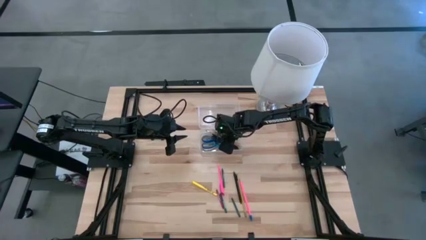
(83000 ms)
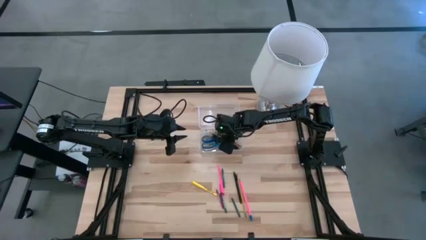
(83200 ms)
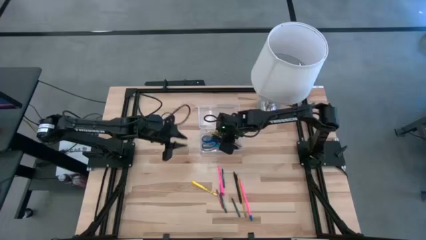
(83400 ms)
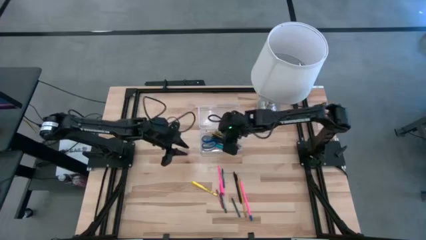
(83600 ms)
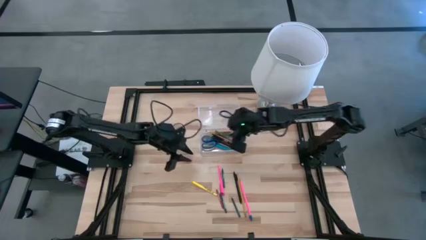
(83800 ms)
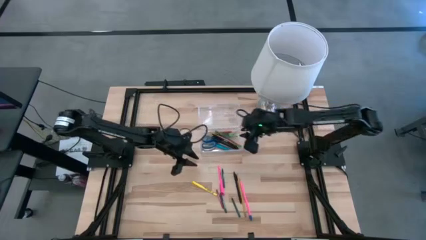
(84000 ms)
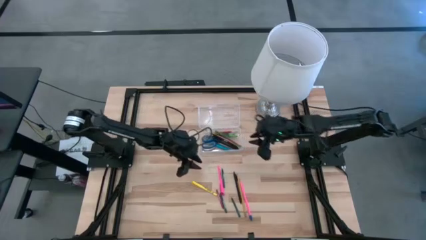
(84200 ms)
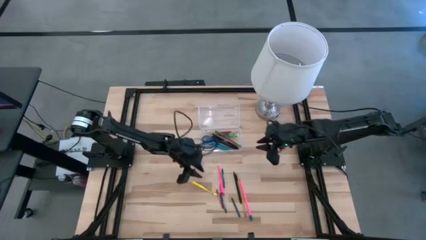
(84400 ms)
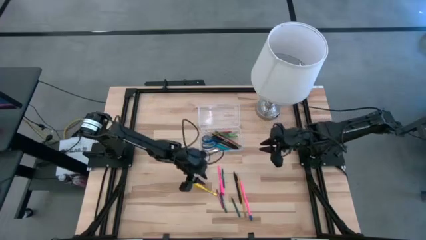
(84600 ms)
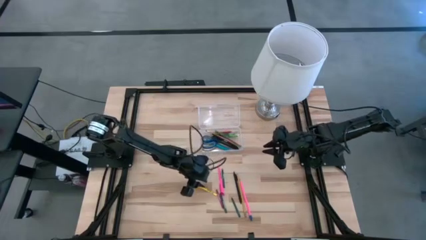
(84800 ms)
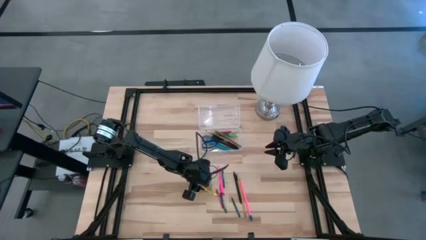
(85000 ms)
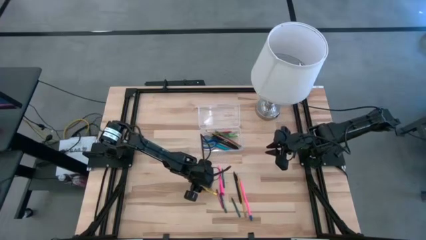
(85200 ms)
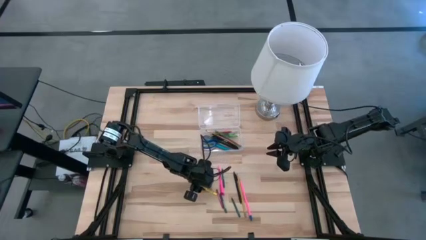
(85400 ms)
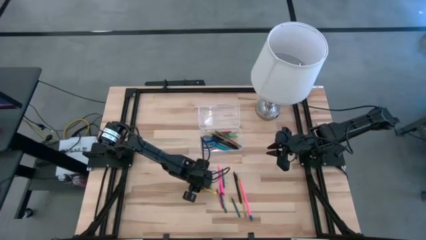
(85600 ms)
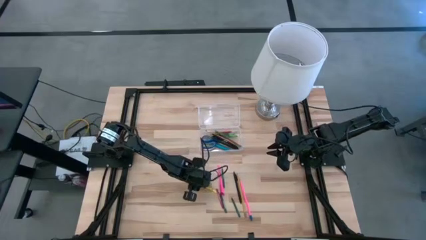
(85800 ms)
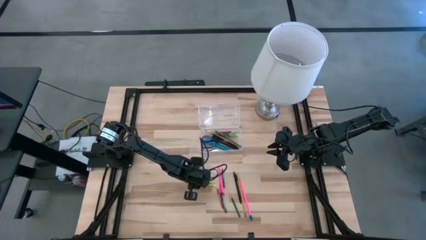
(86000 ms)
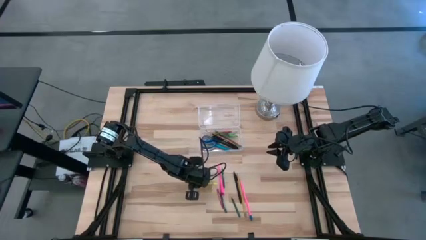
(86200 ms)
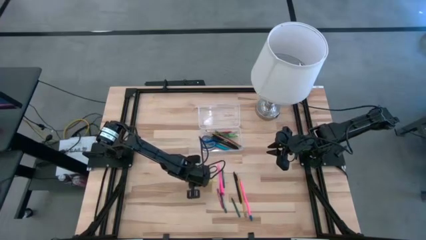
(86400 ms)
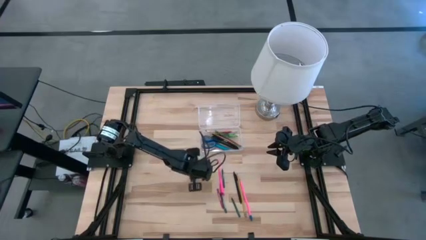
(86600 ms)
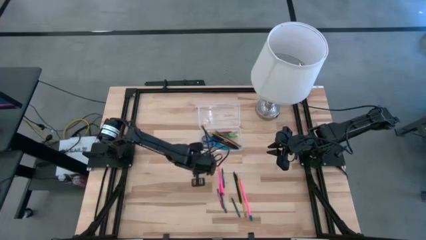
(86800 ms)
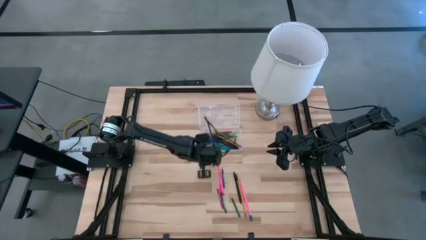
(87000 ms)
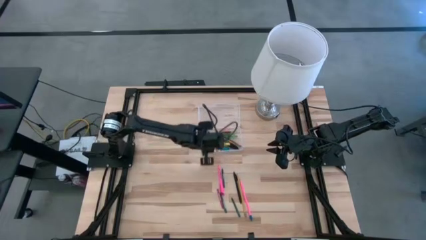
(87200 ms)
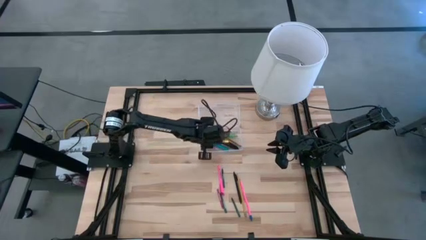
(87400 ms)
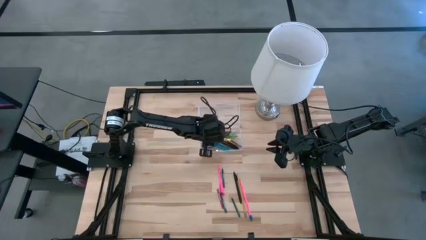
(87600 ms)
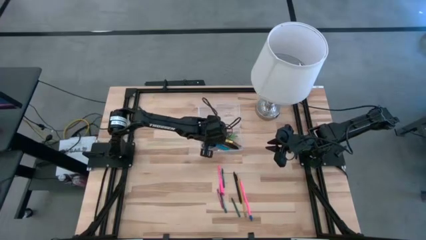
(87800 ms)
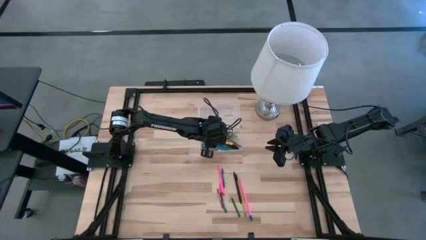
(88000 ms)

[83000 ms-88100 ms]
Task: Pick & place school supplies into a supply box
Put the yellow pen into the transparent supply box

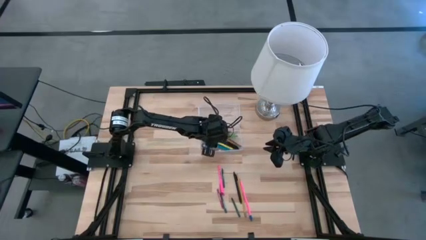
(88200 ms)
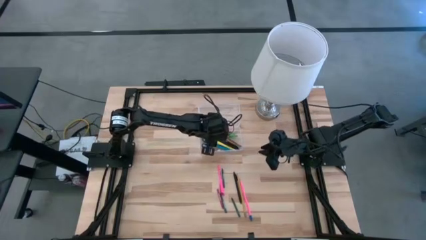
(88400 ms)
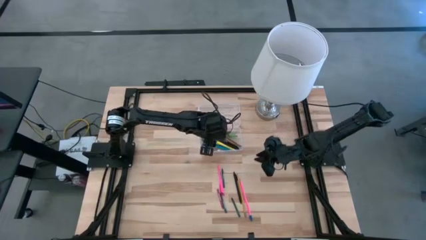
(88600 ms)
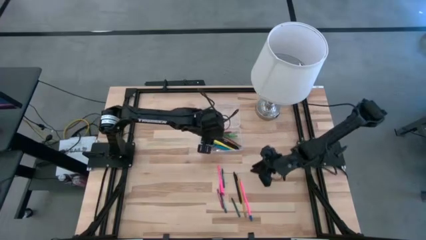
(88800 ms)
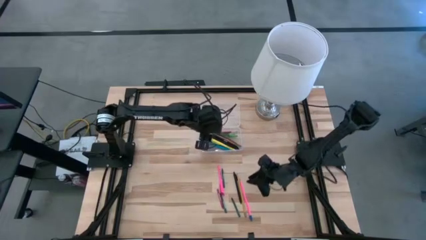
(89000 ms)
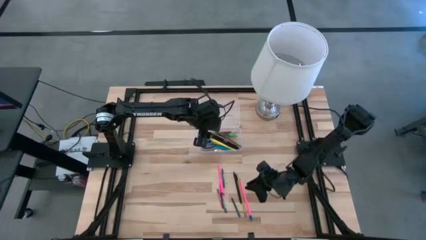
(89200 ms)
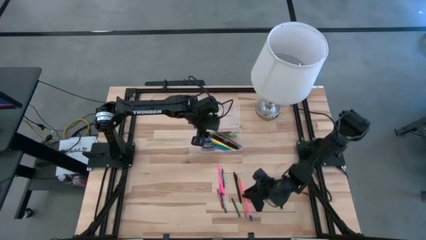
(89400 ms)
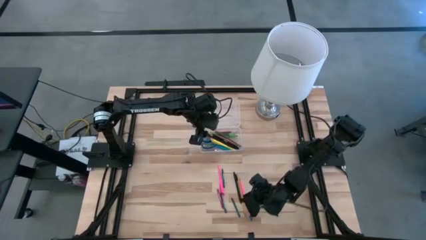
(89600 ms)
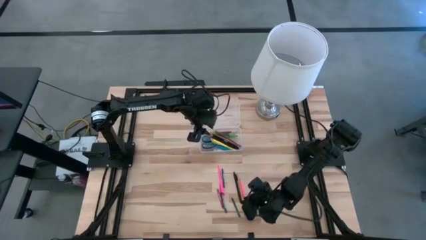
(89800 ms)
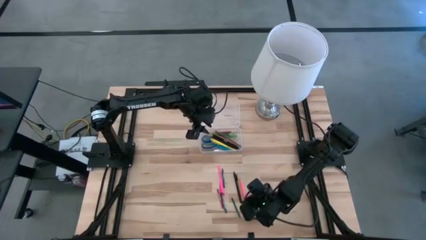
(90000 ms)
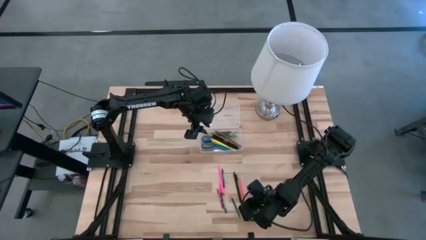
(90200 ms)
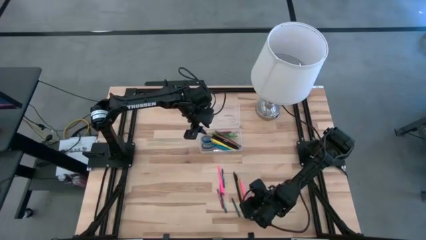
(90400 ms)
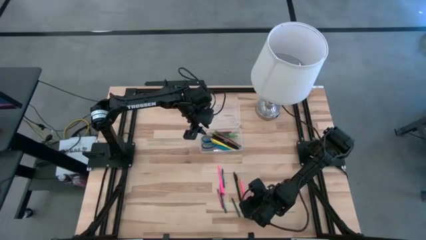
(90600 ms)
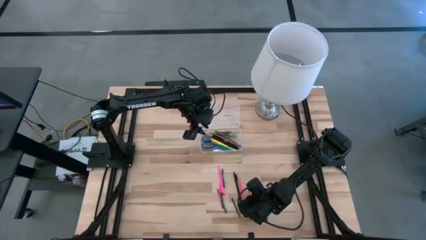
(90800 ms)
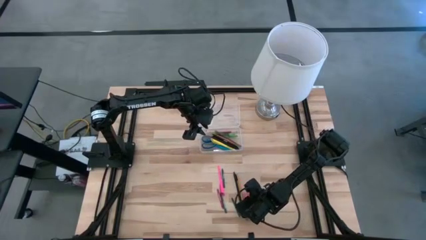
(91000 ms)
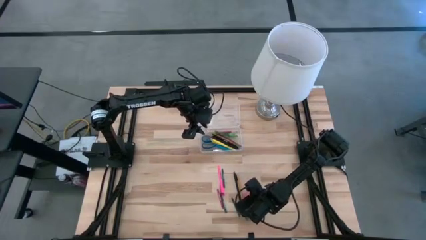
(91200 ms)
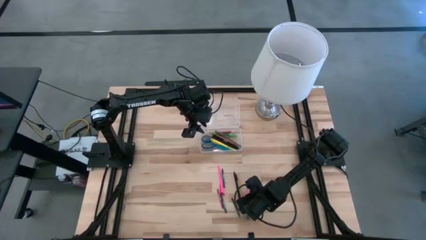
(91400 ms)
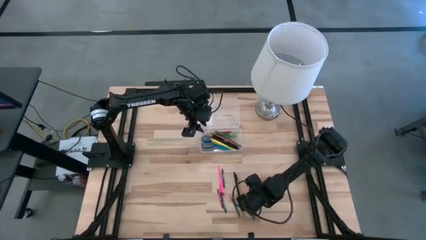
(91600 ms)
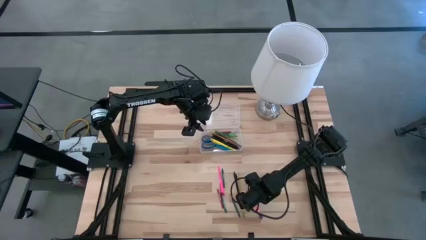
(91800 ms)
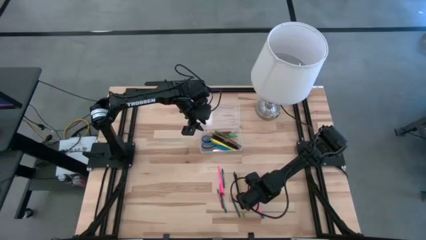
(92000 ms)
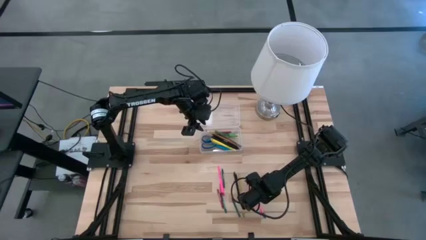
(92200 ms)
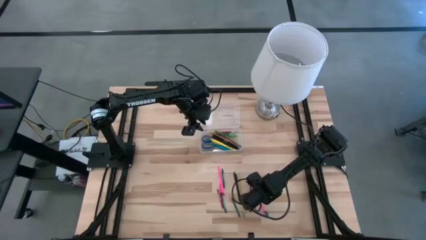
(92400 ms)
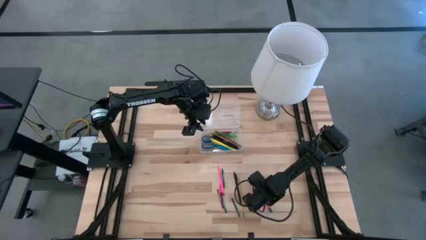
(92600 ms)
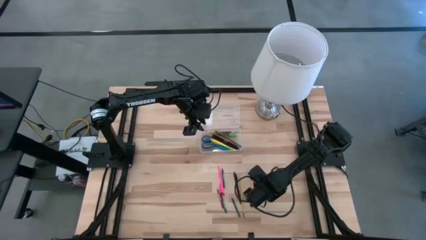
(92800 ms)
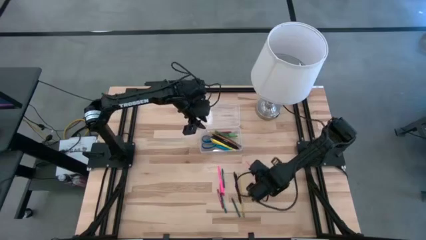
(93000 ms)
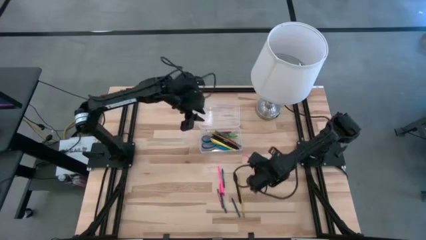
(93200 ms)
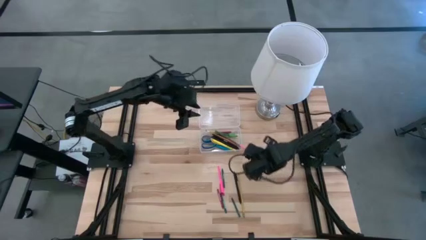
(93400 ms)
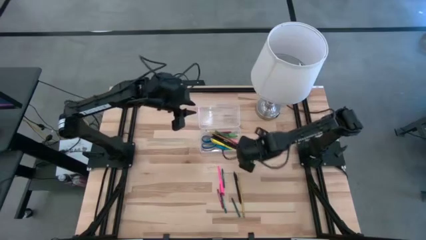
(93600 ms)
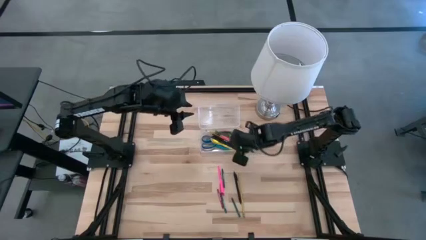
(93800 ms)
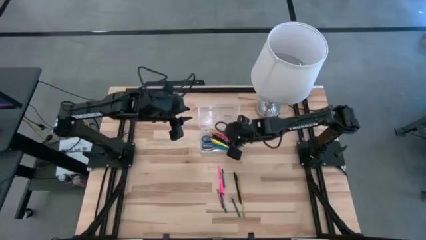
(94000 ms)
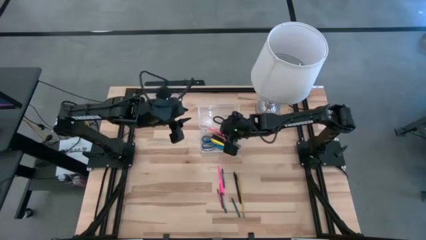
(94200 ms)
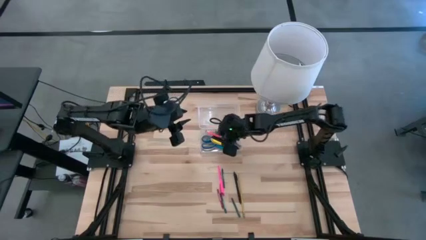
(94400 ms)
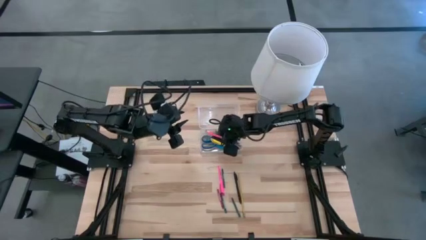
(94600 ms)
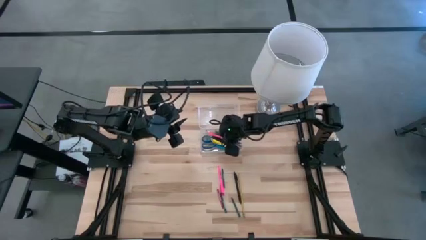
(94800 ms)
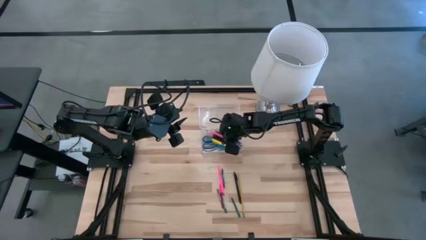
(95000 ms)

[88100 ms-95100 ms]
Put the pink pencil into the transparent supply box

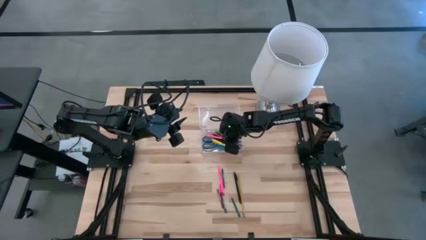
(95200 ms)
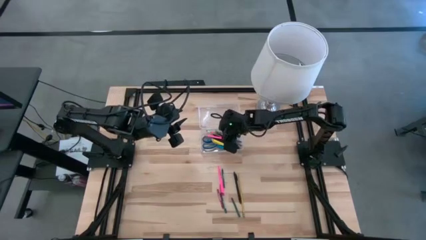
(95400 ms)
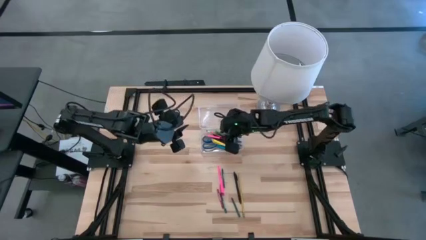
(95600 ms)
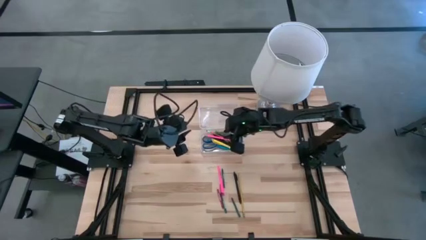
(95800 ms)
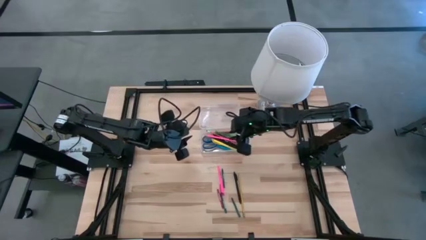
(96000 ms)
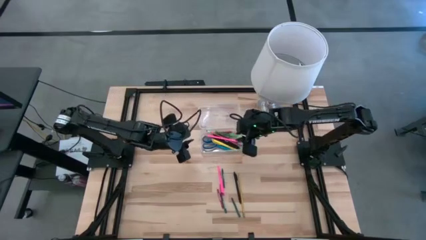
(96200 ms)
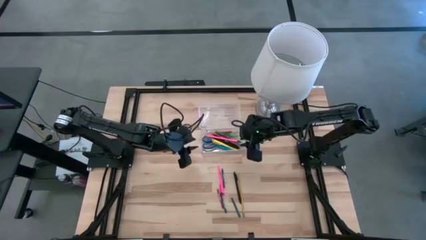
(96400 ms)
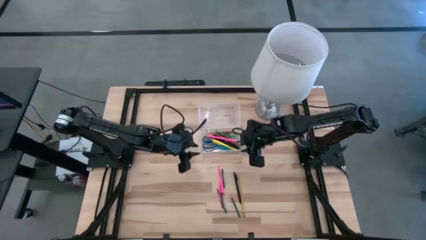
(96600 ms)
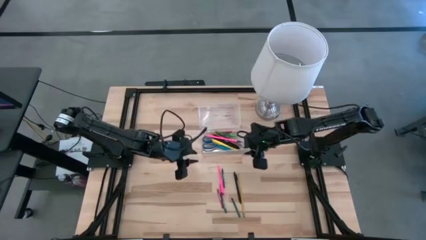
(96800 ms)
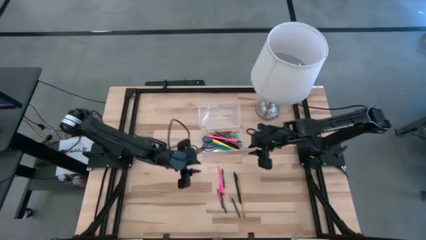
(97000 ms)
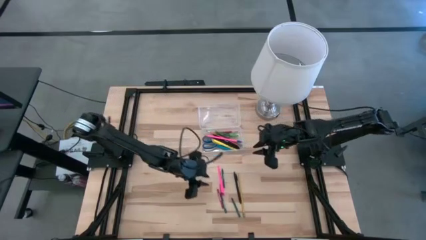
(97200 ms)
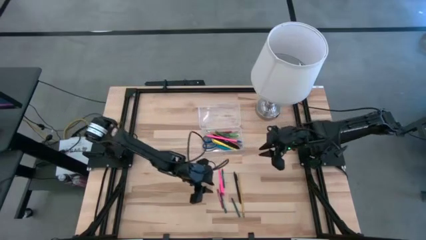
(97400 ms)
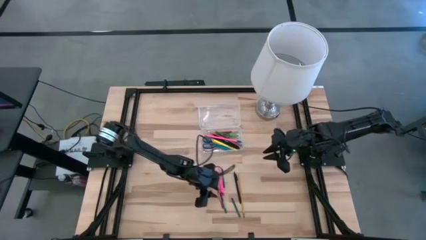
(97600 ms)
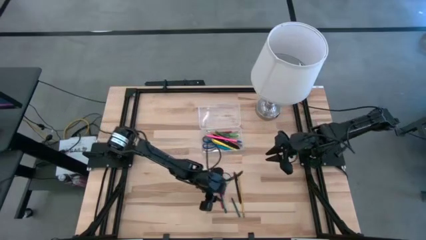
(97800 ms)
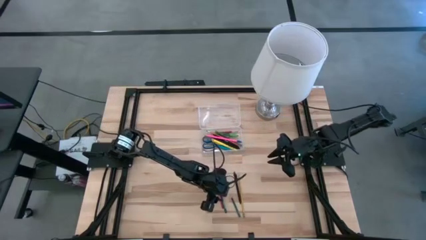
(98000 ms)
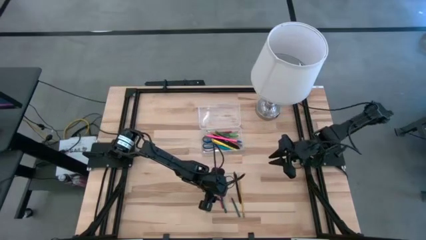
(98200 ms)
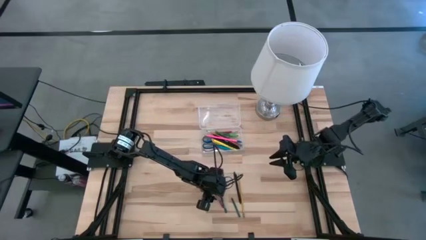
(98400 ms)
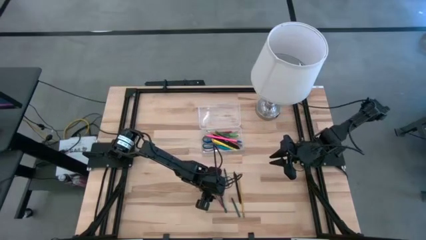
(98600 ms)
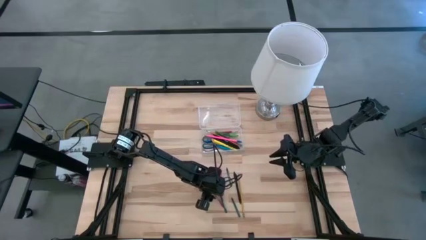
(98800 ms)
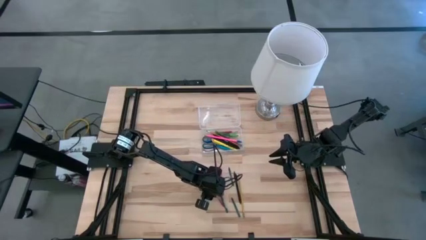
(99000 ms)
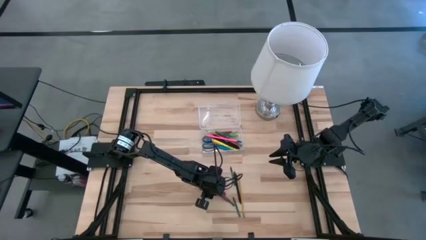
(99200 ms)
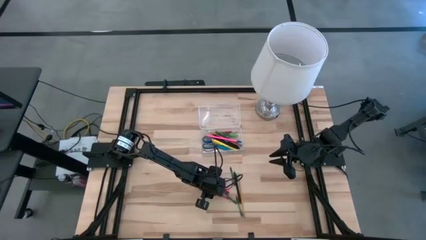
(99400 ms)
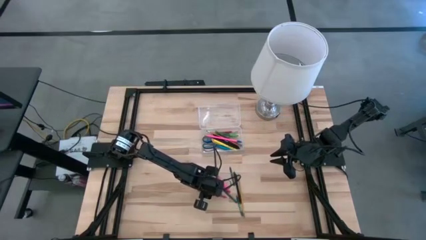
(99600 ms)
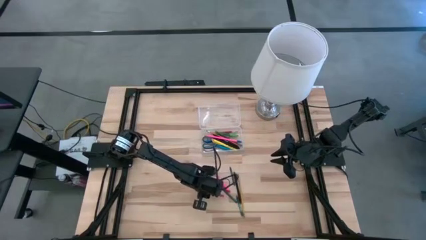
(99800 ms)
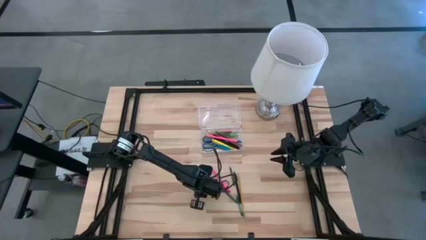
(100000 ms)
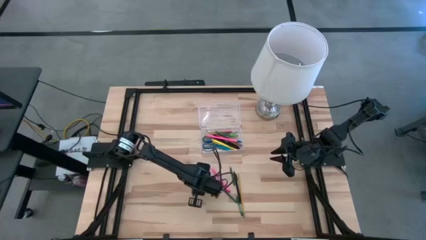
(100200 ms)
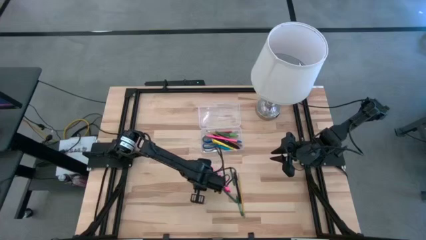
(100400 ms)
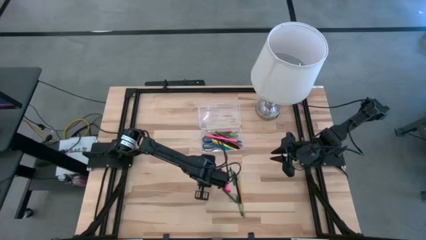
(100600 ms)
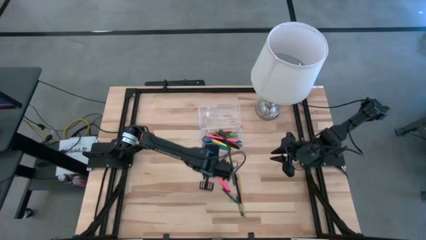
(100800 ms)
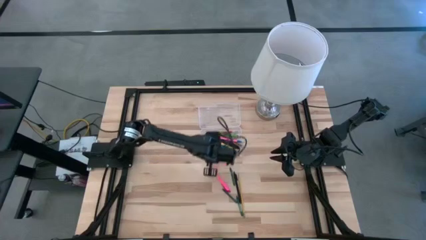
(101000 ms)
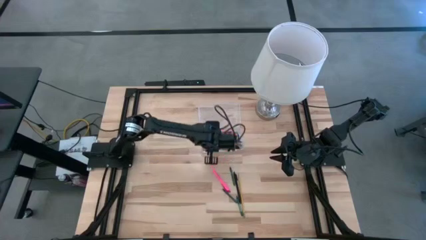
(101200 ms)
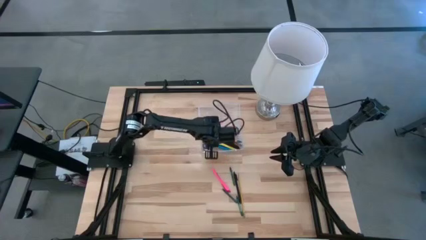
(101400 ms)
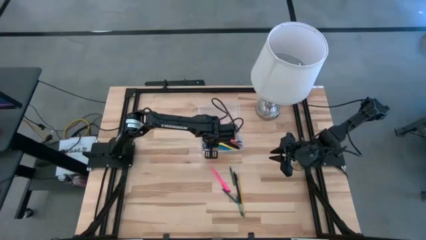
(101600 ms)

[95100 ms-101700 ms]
Put the red crayon into the transparent supply box
